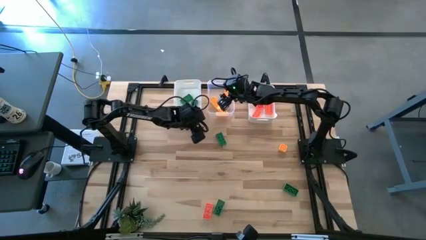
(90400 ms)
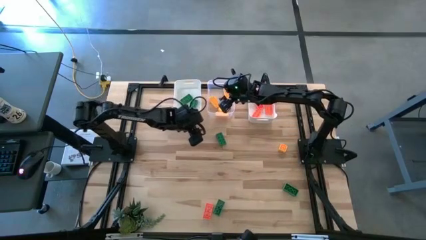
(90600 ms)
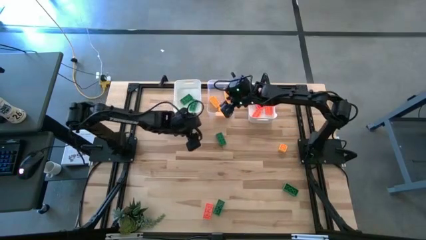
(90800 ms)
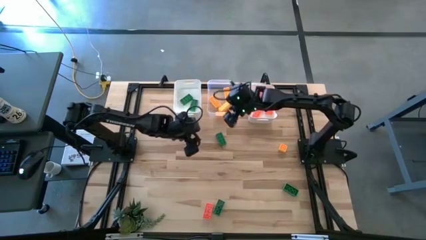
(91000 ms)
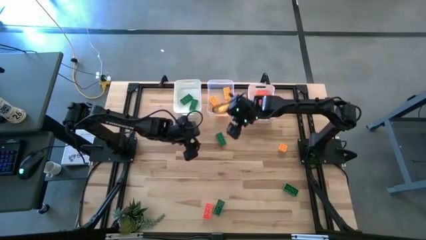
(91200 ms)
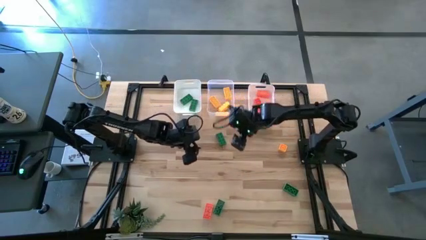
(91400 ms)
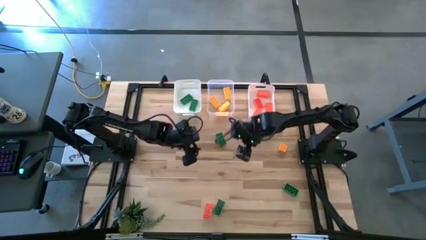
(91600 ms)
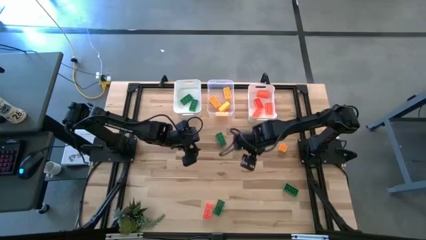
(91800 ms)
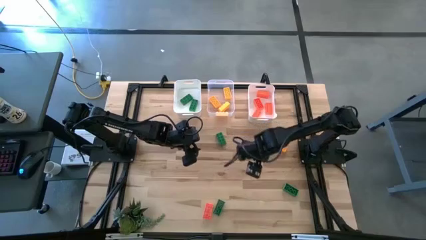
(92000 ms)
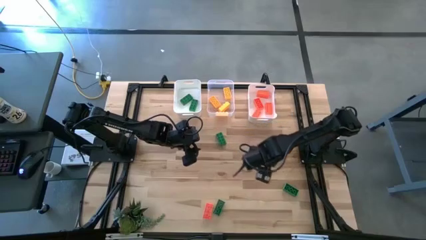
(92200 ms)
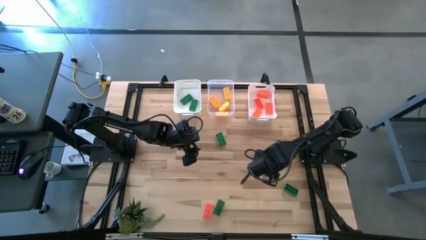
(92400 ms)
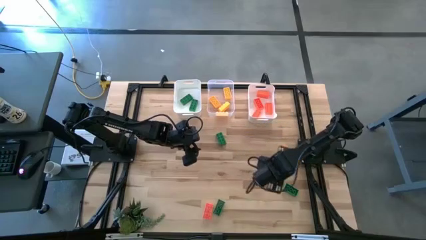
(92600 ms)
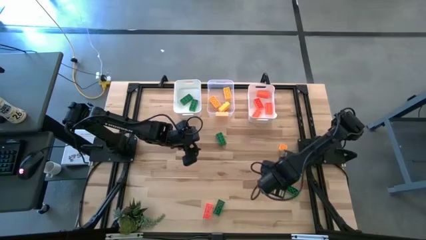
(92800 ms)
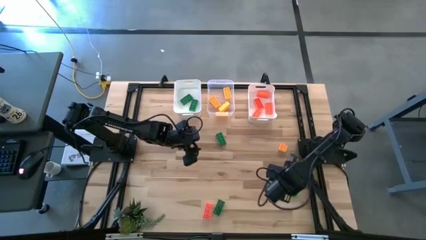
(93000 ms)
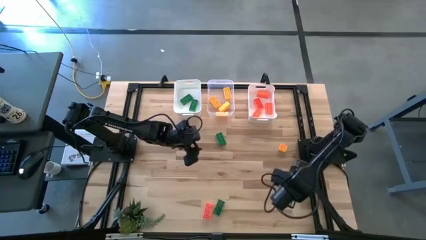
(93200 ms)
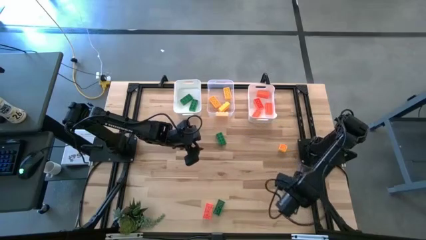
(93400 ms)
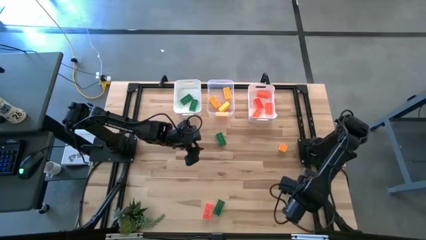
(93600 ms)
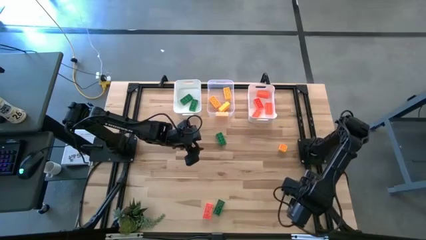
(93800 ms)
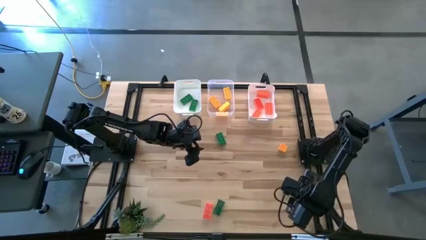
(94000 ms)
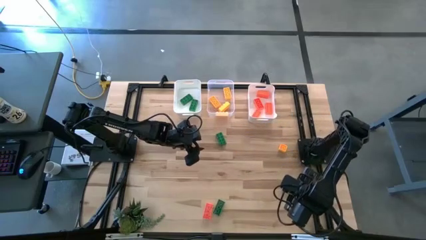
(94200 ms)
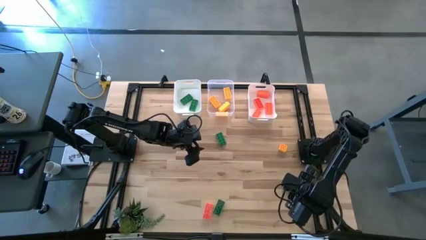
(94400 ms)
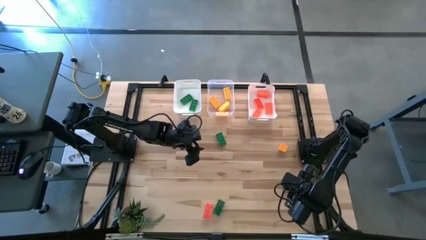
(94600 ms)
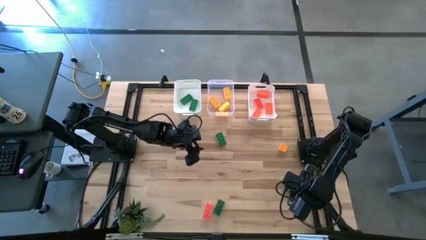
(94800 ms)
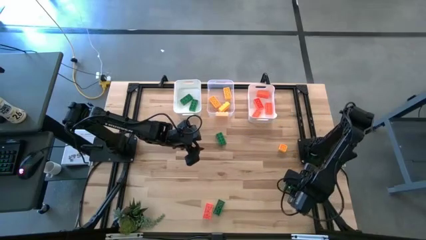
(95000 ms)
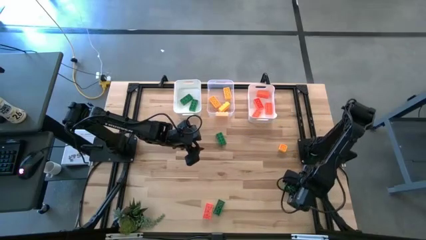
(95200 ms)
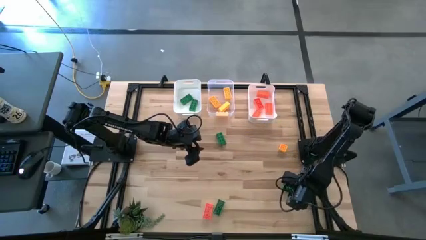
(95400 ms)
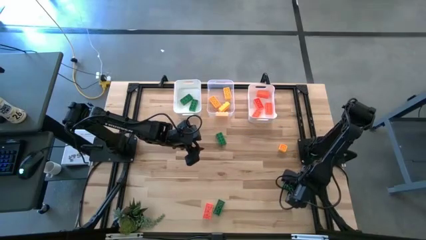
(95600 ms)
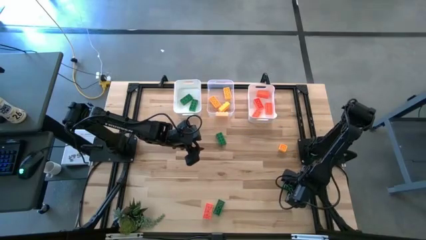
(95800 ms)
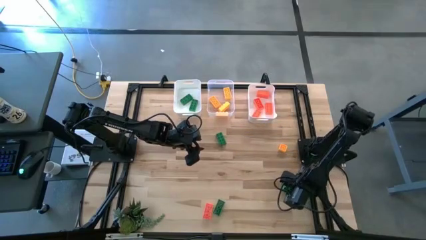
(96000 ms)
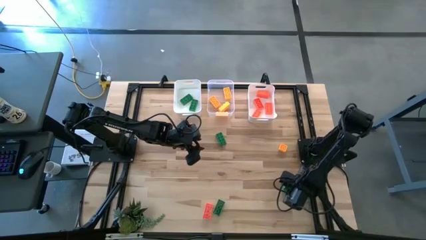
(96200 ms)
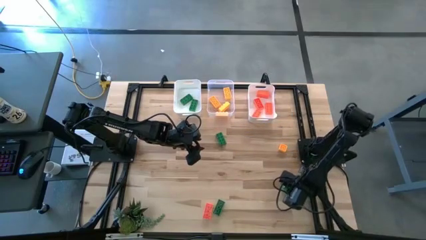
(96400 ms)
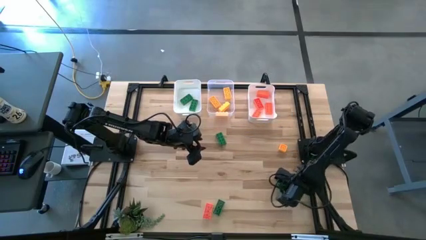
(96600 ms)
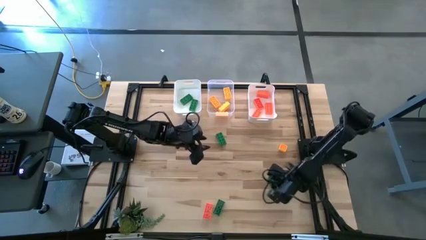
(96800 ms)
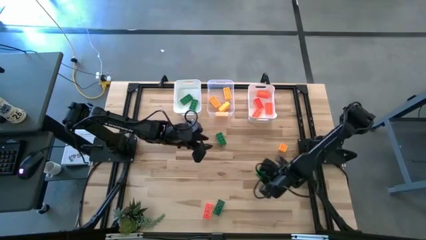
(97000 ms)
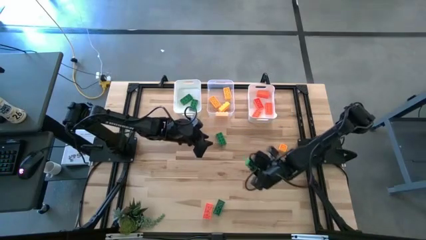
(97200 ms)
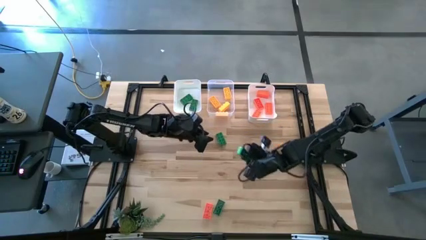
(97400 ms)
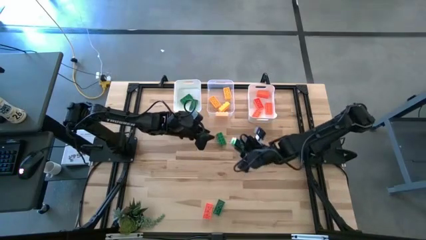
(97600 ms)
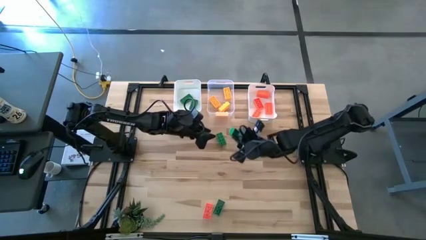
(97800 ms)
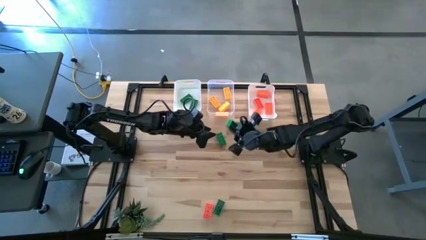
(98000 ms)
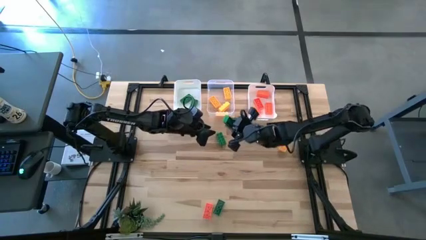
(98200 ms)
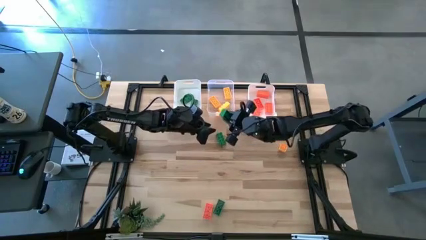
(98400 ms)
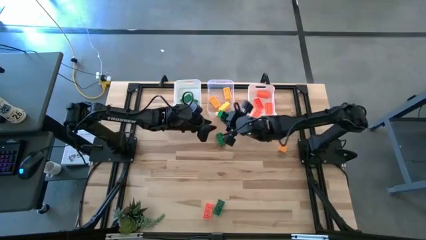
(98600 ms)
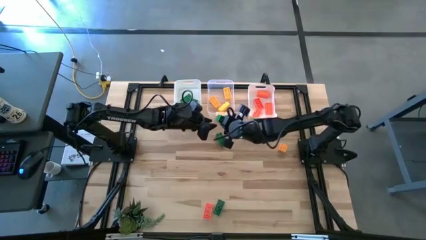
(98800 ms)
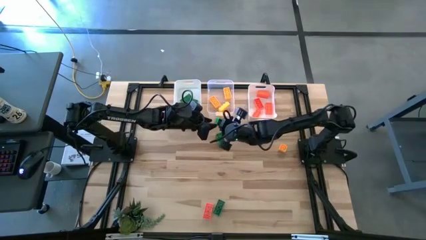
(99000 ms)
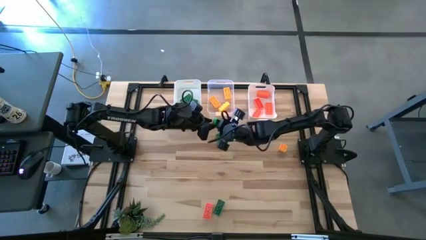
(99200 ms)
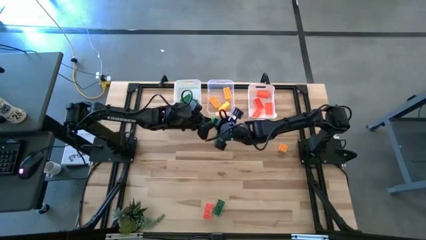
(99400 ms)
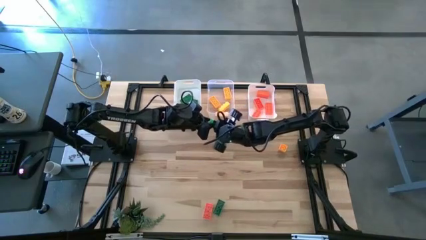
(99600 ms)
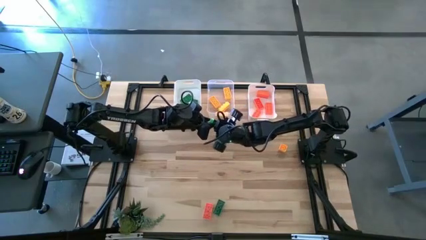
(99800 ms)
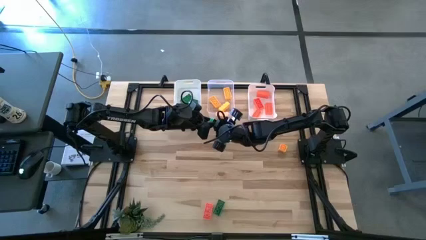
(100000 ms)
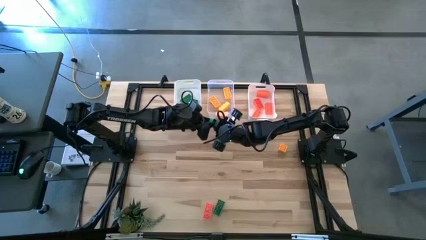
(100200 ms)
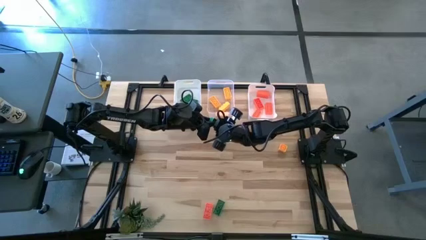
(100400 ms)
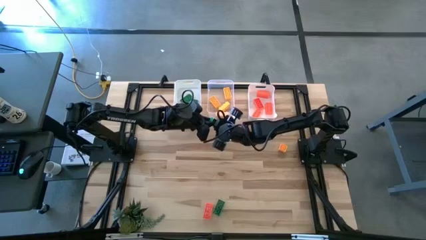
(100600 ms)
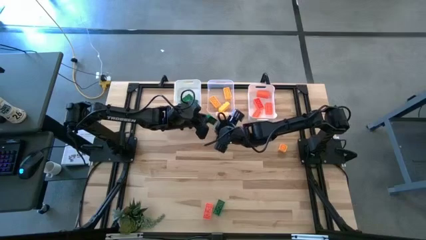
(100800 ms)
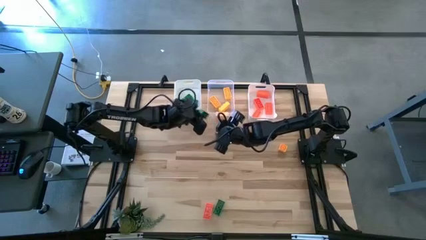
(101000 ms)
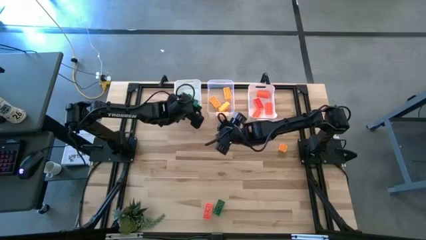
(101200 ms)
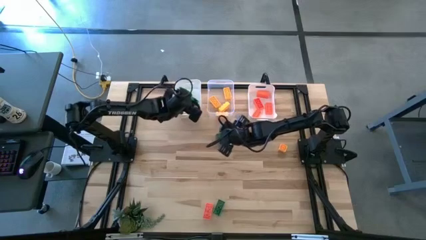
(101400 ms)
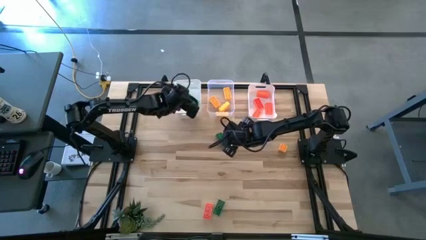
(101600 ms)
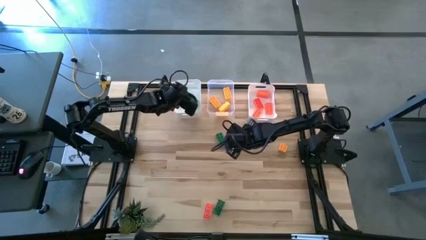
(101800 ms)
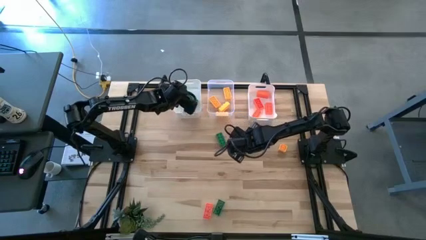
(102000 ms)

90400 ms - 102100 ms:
Task: Sort & place blocks by color
Put the green game piece into the left white bin

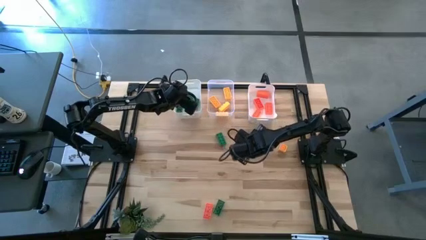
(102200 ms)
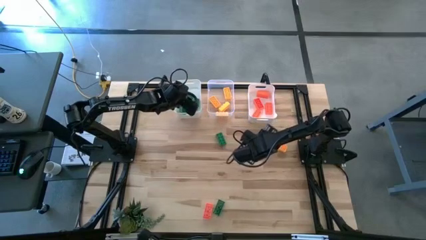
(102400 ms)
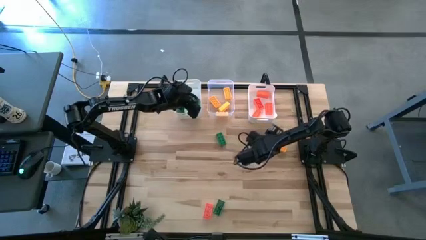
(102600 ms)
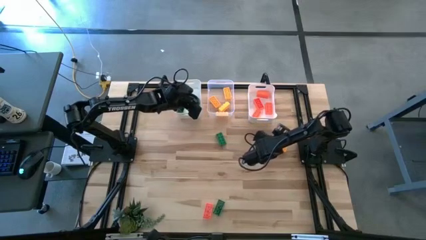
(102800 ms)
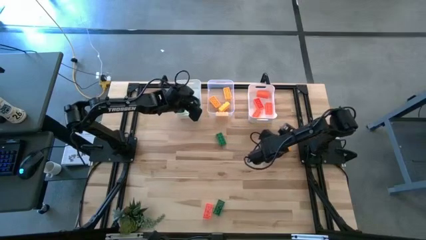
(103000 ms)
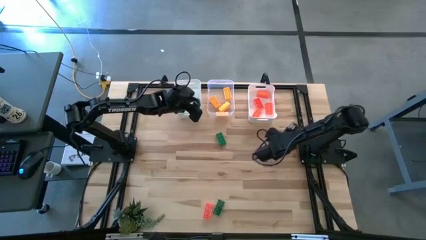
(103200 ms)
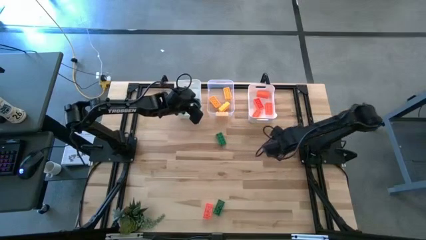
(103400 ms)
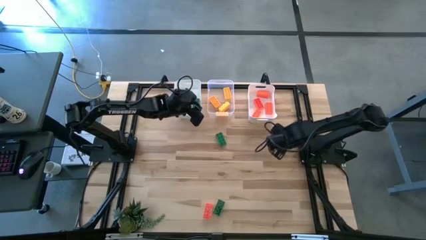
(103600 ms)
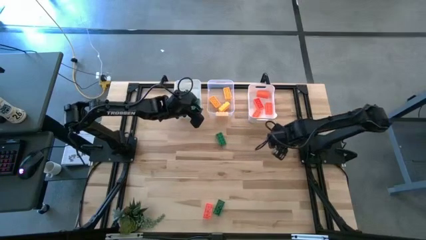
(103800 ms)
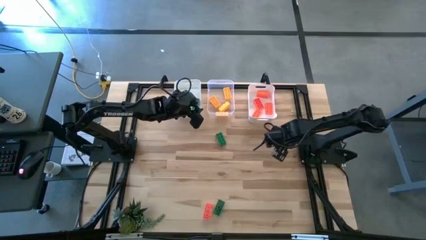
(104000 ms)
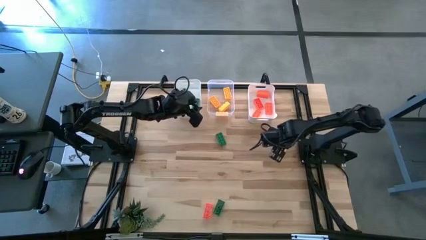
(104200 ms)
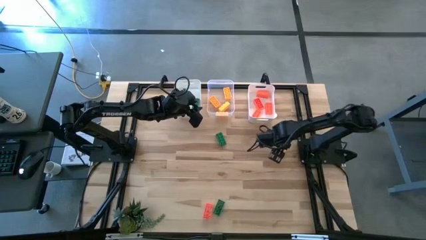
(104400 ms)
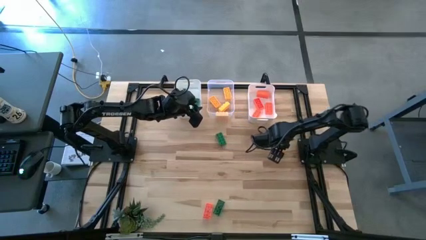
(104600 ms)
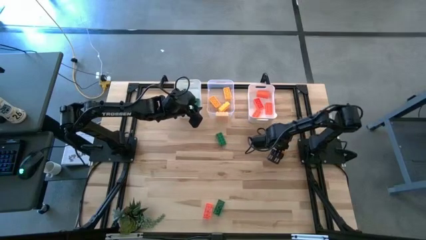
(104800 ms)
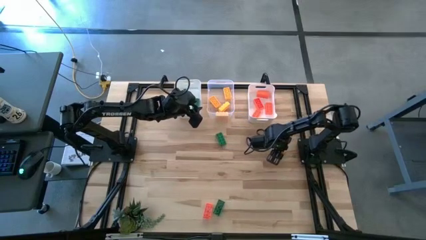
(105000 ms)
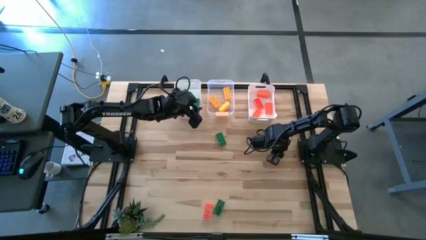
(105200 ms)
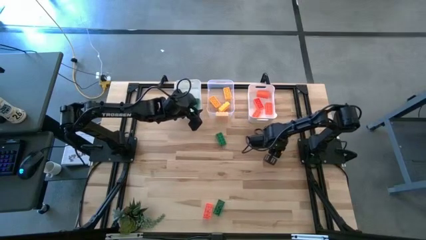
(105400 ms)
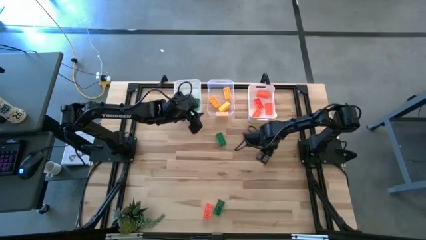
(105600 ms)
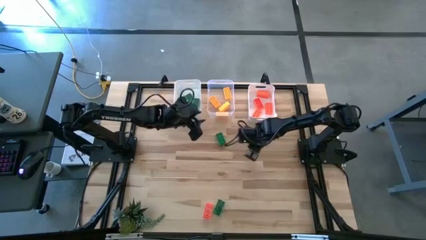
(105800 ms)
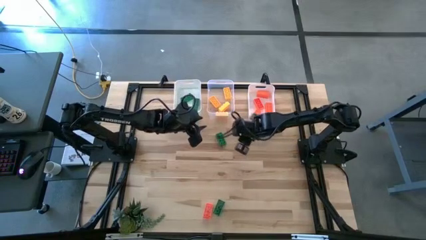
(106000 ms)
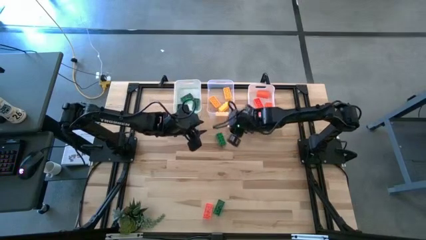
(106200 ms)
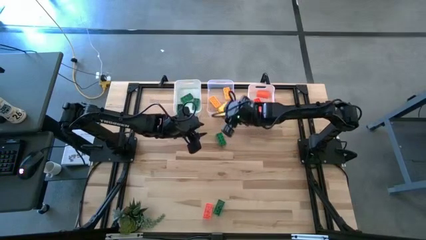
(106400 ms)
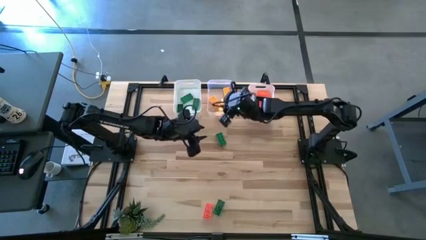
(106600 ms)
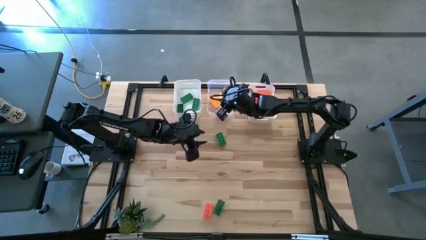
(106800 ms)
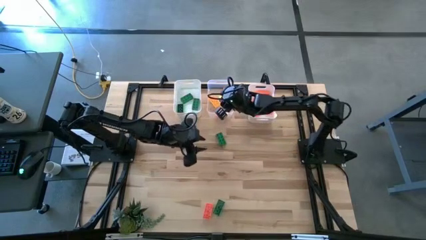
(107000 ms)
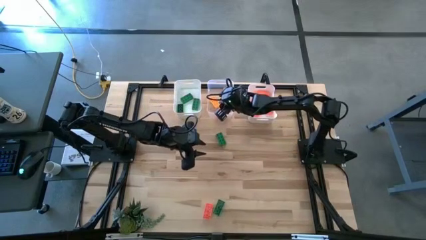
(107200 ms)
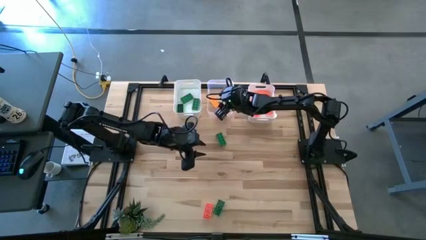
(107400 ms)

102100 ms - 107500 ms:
Put the yellow game piece into the transparent bin
